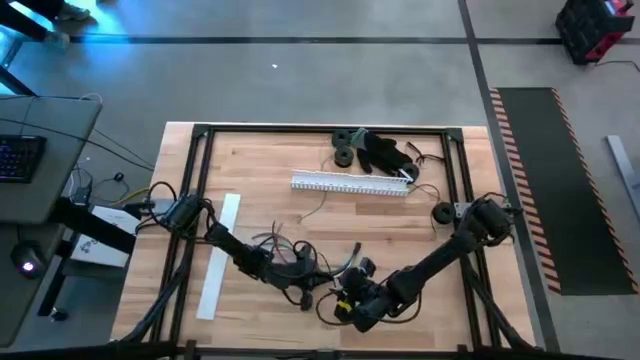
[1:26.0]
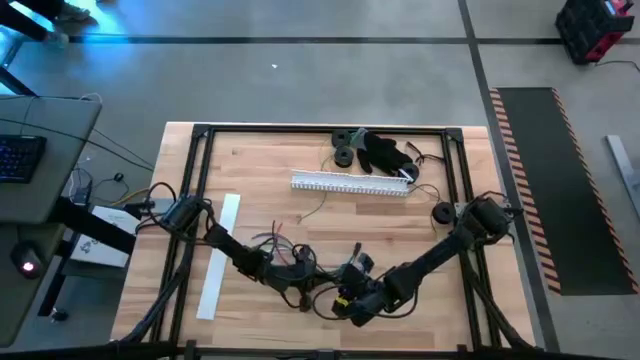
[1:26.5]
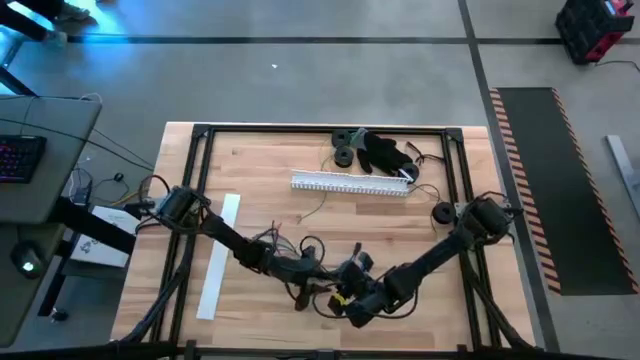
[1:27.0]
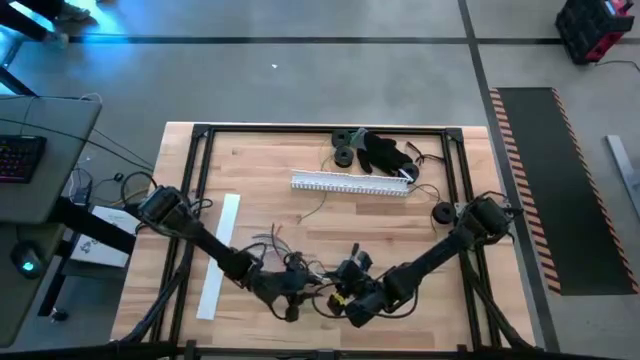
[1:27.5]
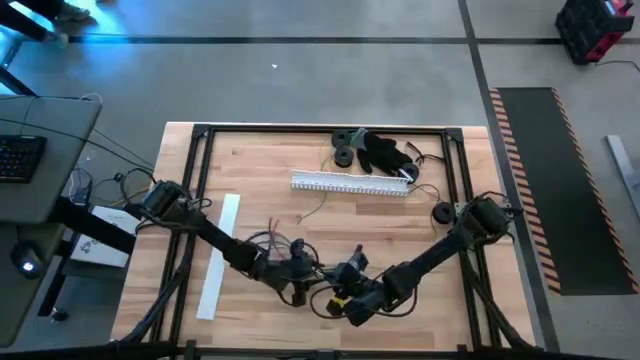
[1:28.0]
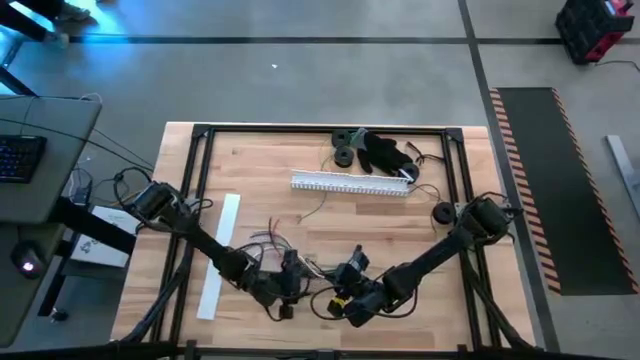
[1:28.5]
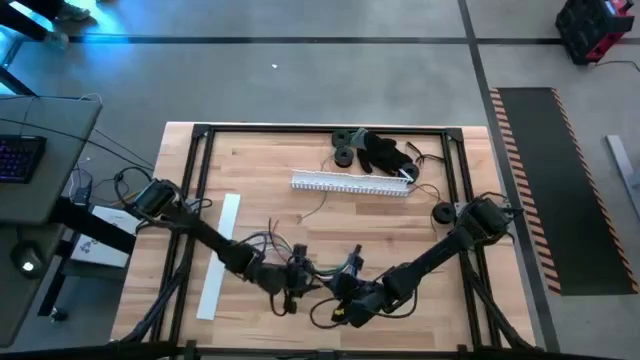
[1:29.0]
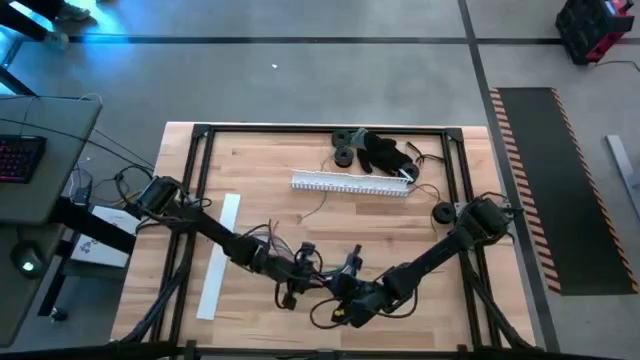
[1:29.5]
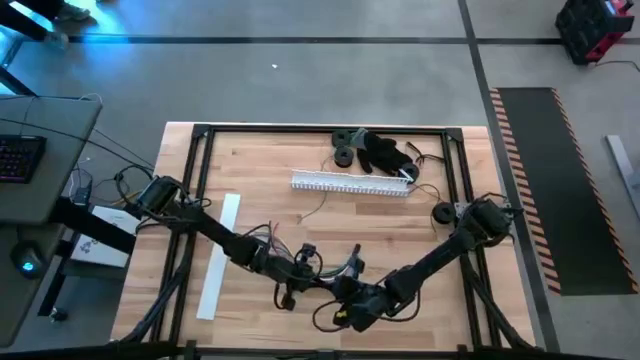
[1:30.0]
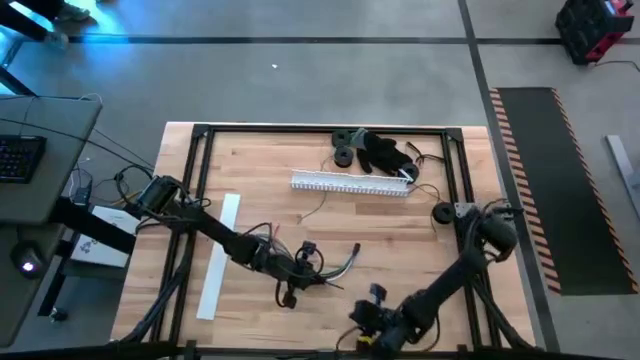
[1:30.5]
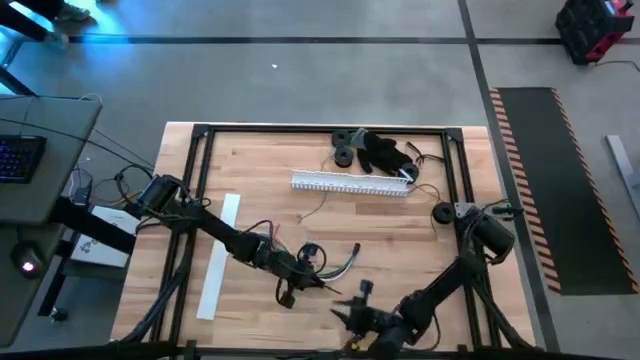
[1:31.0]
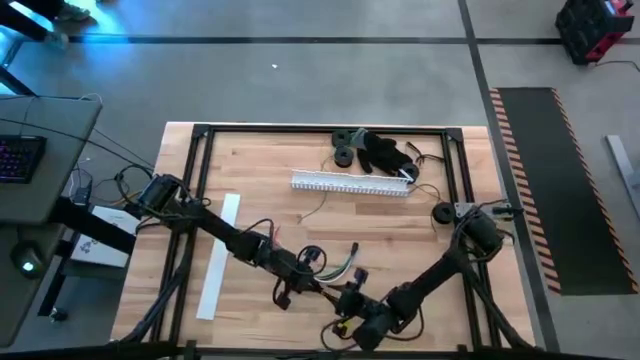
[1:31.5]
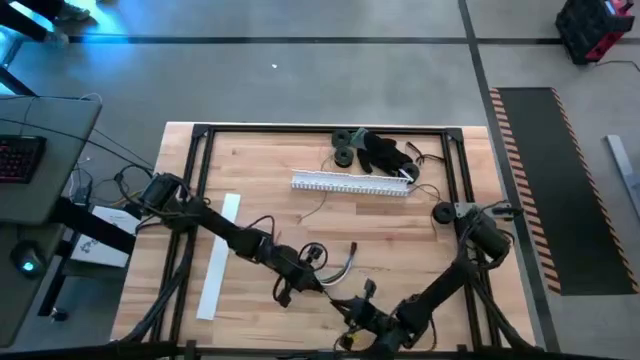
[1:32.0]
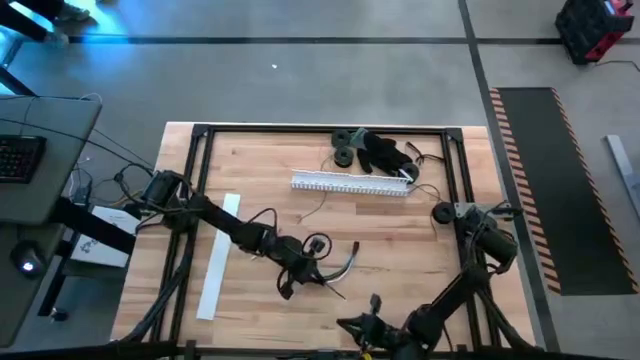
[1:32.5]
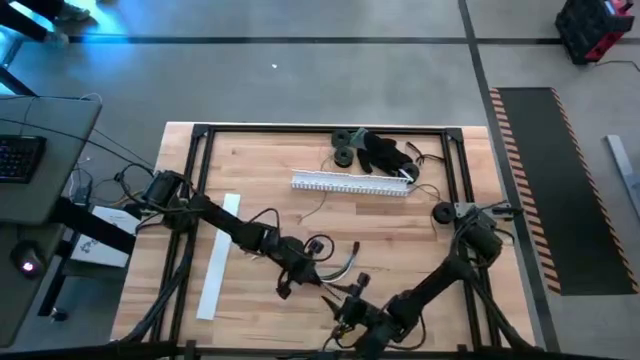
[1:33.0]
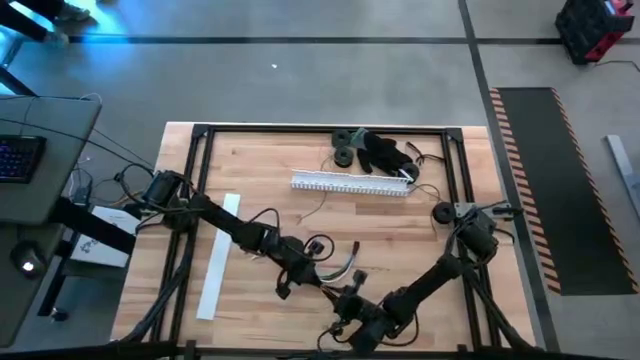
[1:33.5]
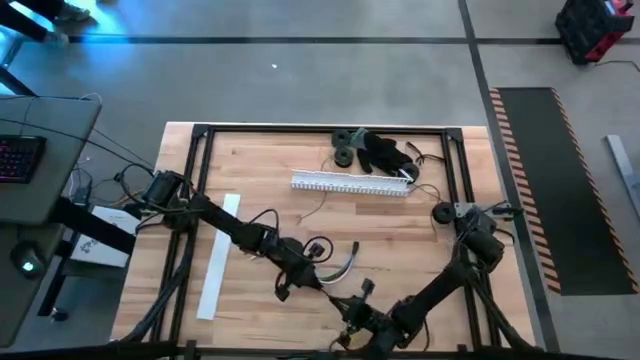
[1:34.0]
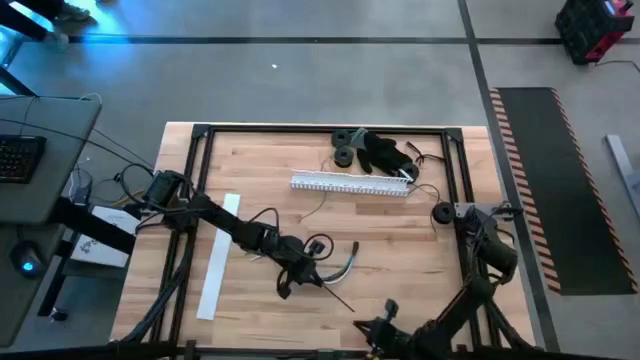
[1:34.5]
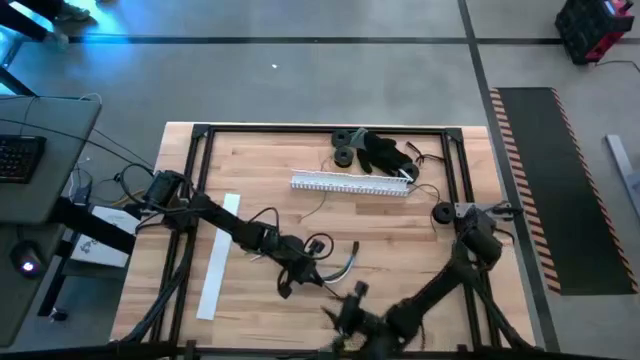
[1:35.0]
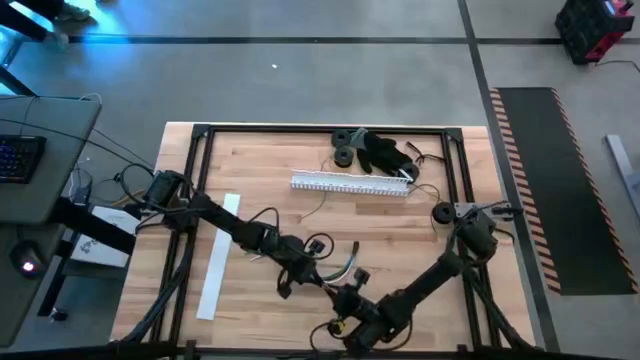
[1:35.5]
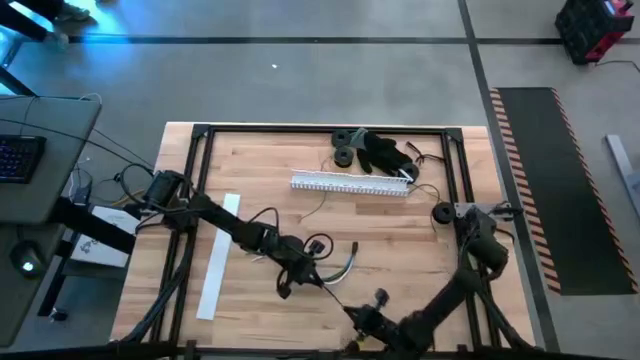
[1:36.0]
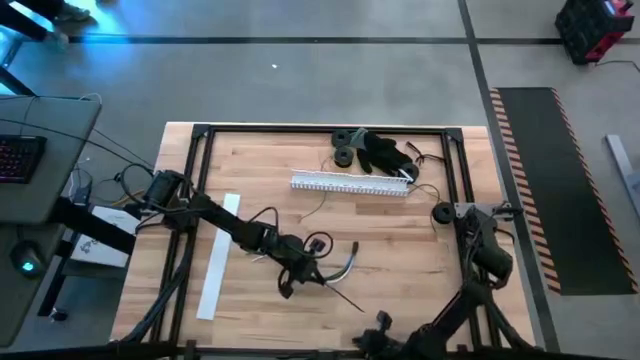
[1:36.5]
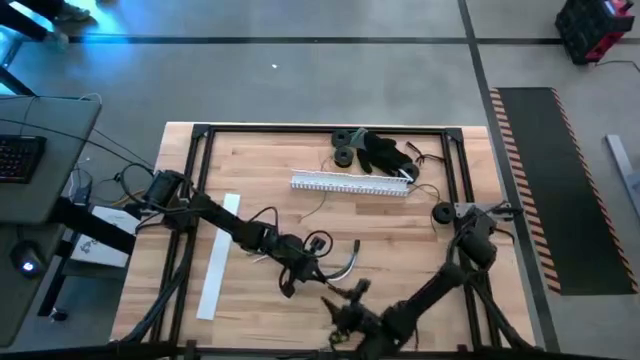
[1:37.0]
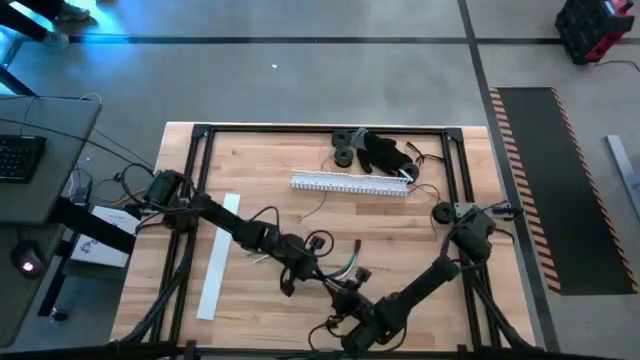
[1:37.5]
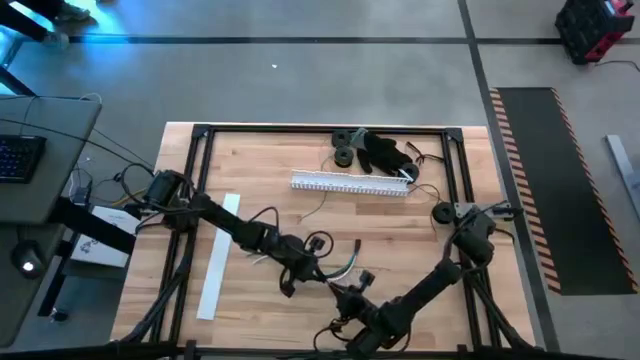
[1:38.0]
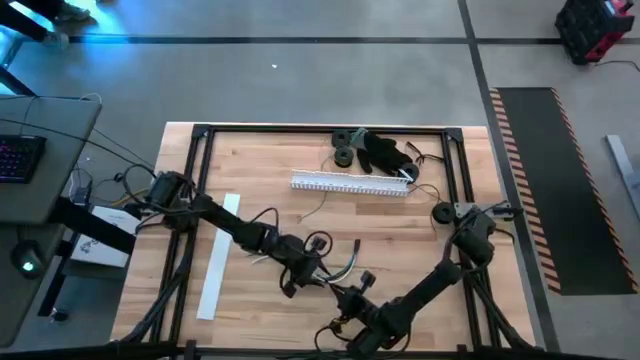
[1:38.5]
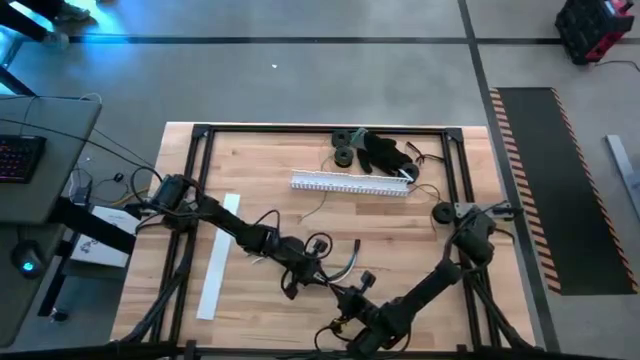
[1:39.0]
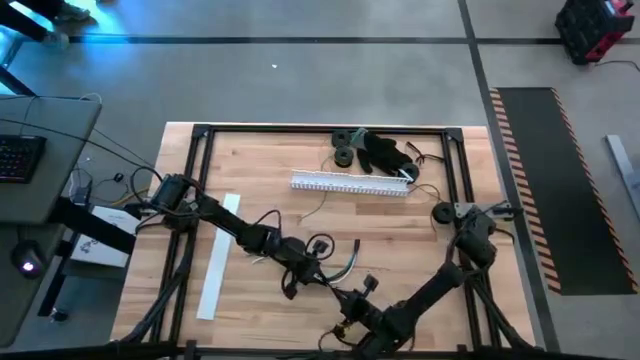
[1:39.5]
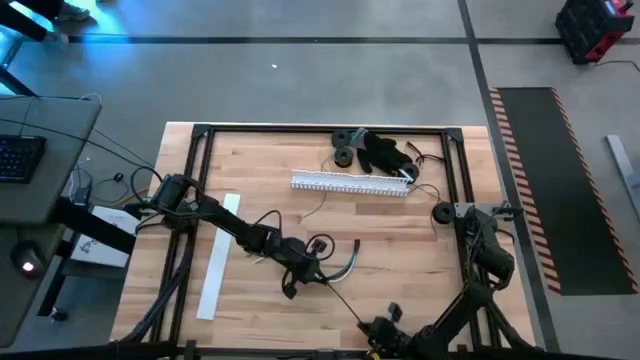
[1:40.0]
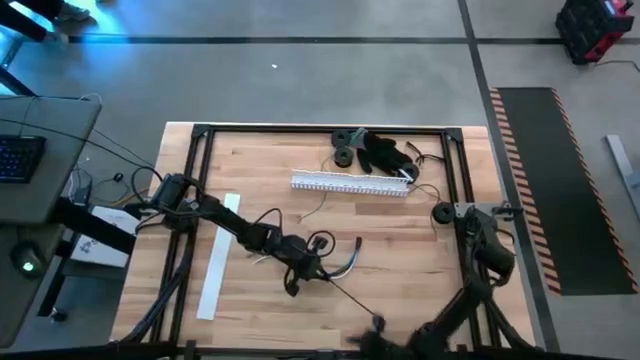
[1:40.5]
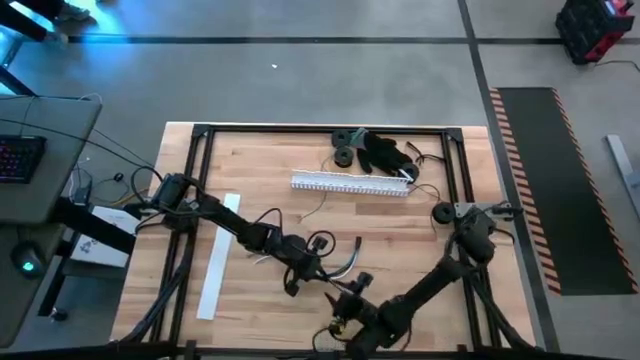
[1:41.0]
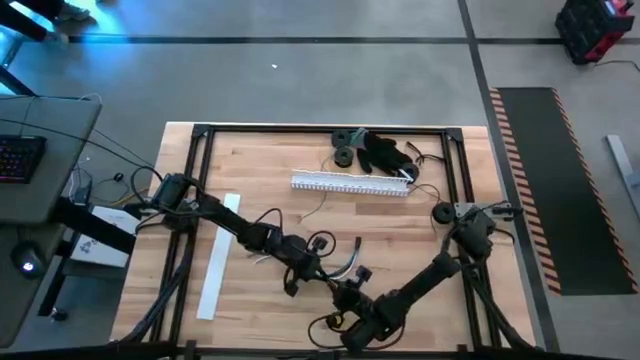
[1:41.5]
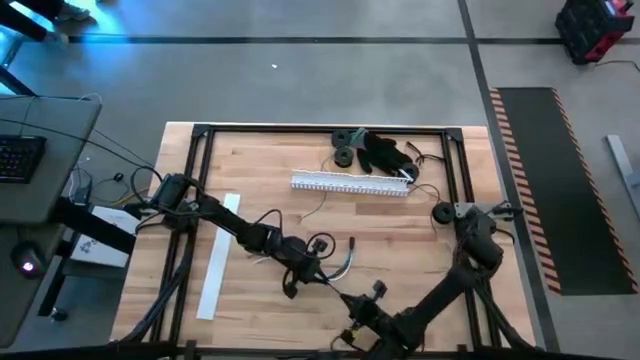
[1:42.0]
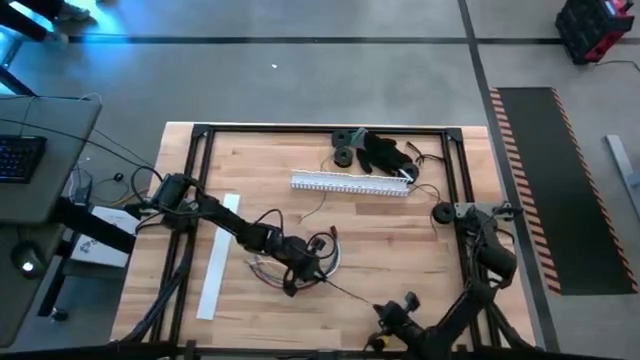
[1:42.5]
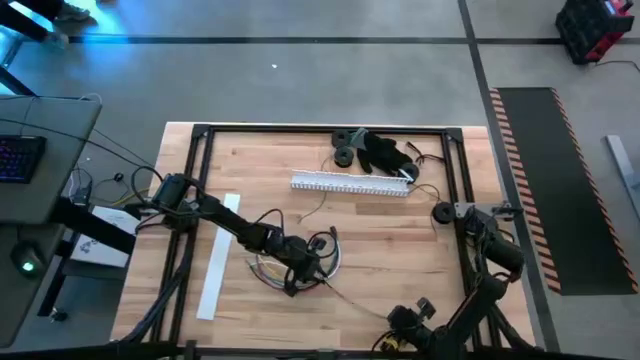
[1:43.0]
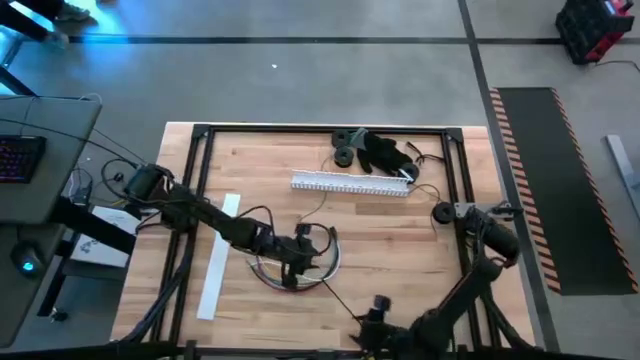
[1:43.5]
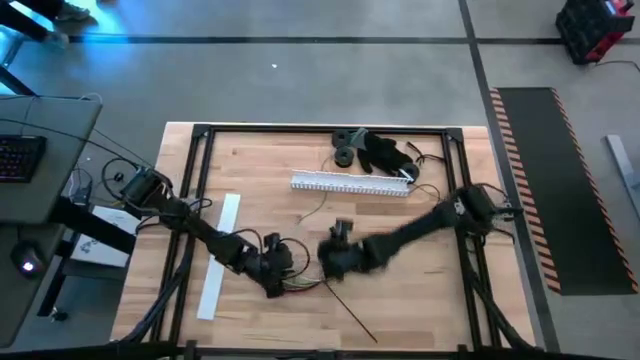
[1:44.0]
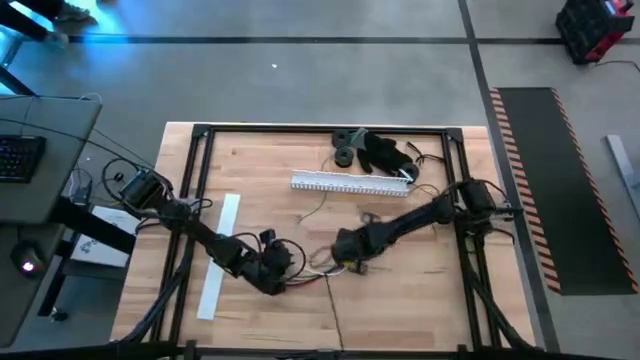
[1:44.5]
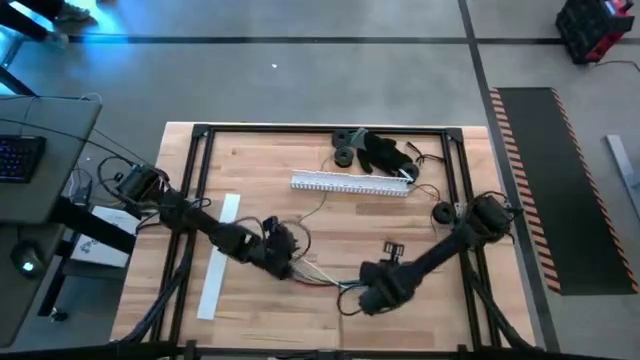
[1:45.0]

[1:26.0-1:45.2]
Task: Ziptie cables
Wrap the cable wire using a black zip tie

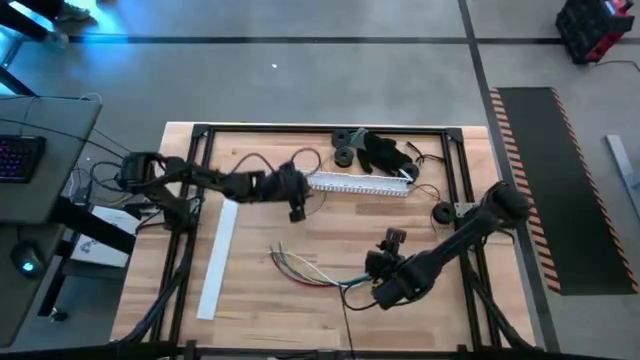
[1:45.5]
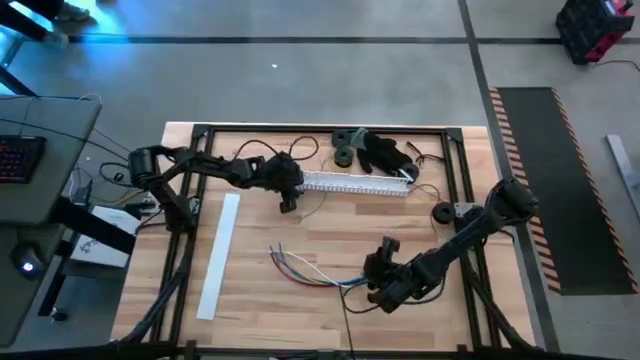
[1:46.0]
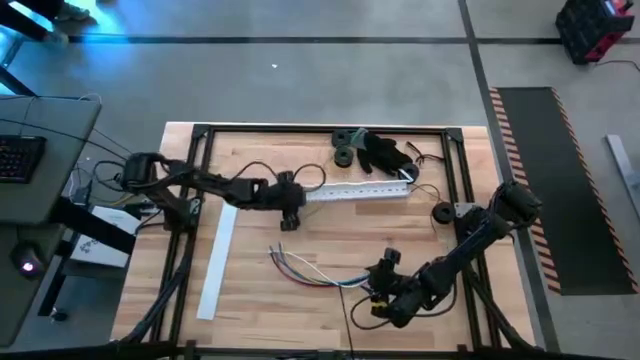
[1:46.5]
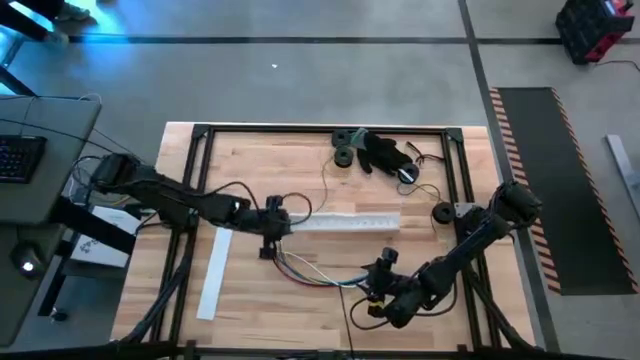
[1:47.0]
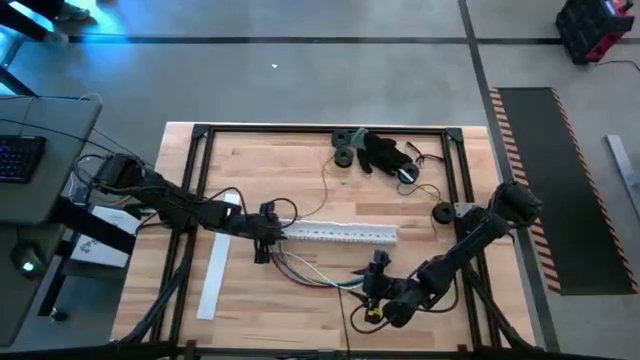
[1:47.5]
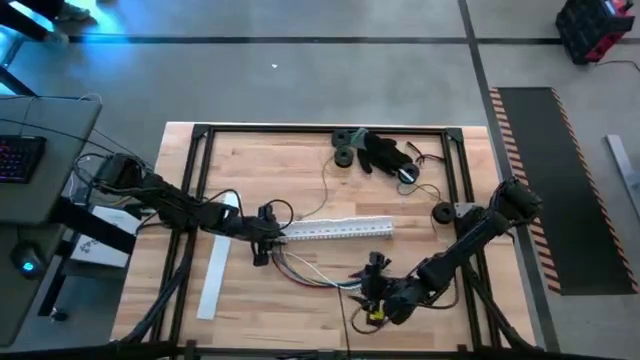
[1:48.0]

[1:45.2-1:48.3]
Adjust the white cable duct
